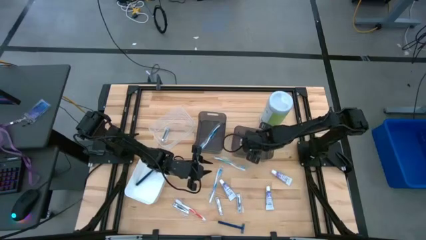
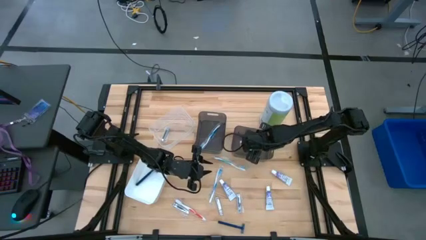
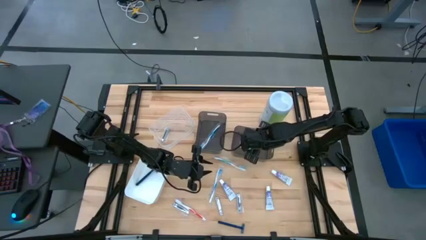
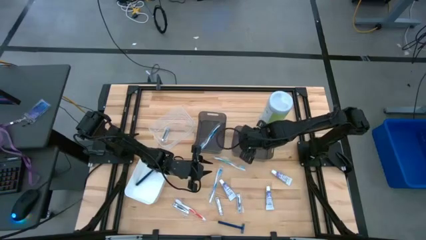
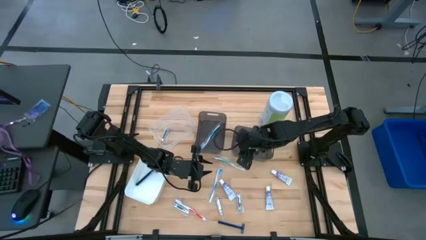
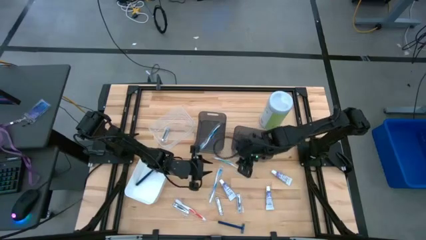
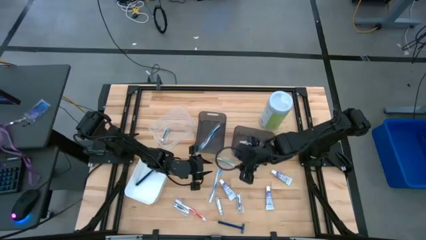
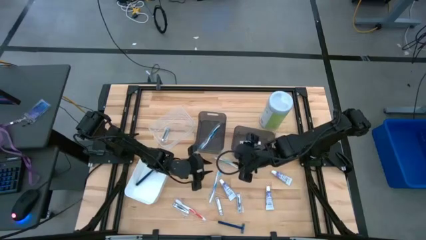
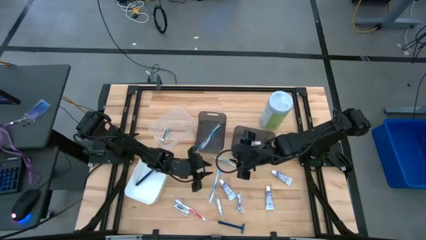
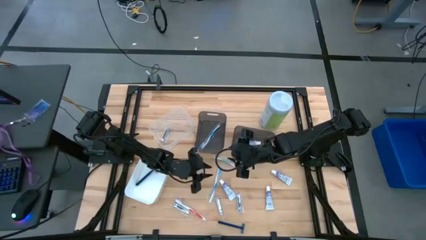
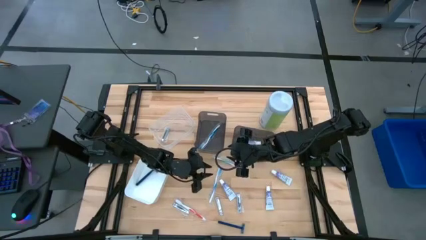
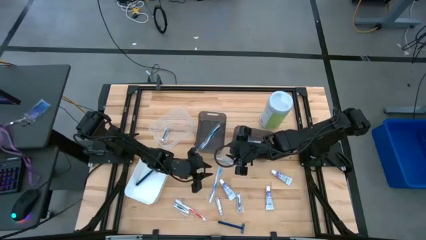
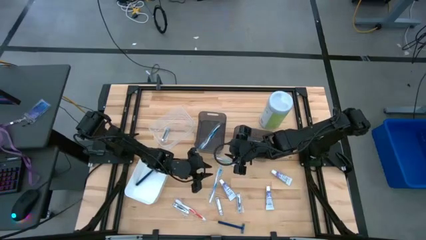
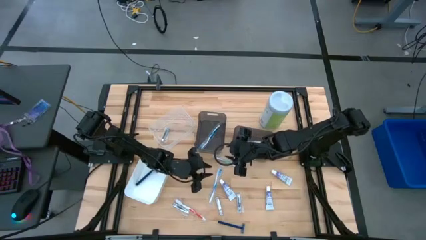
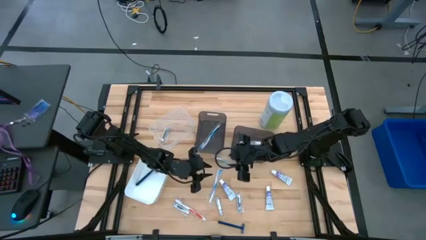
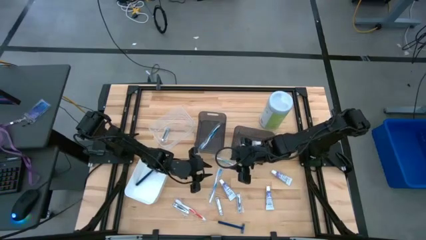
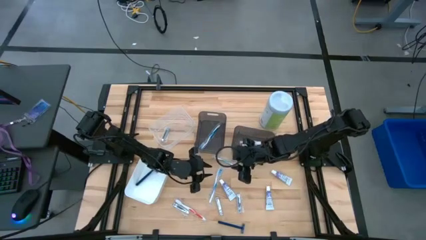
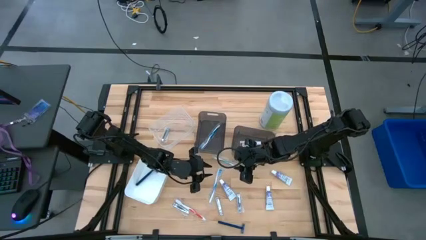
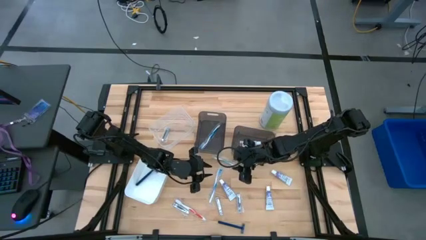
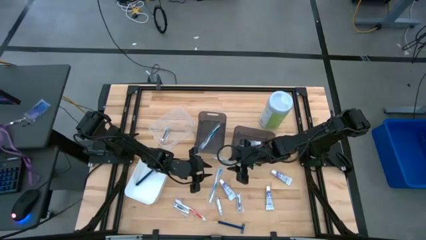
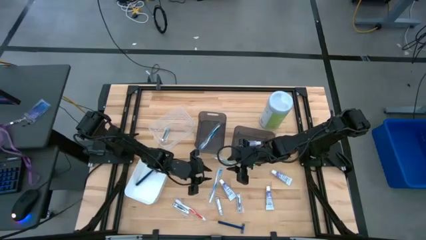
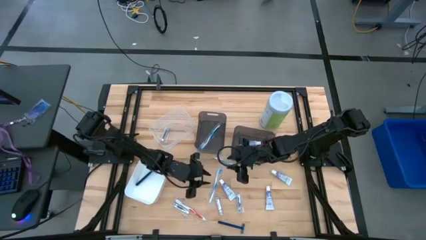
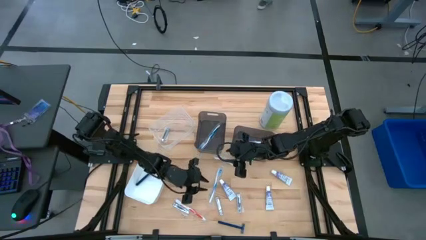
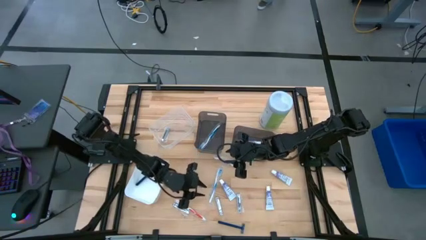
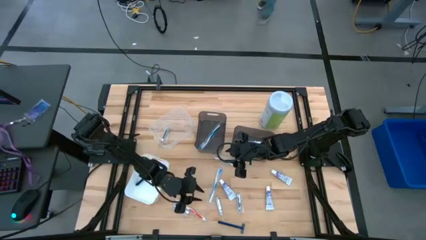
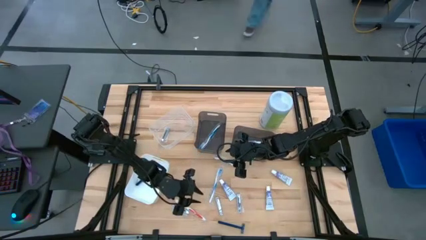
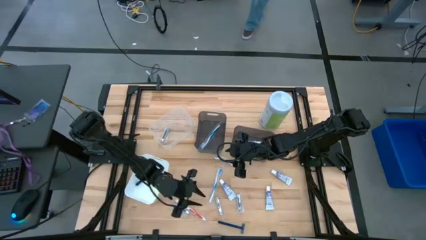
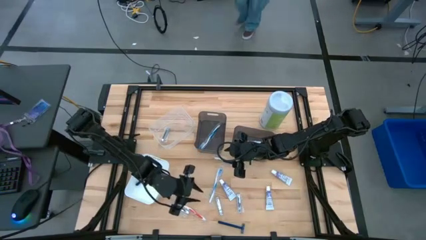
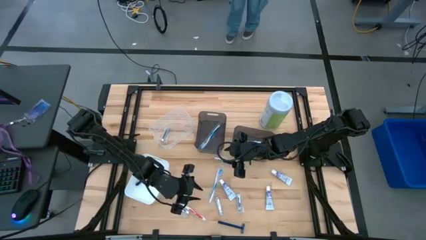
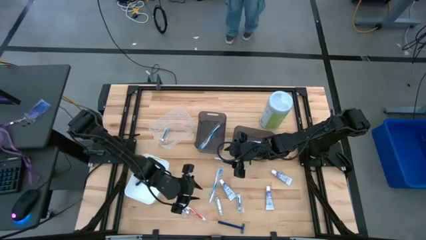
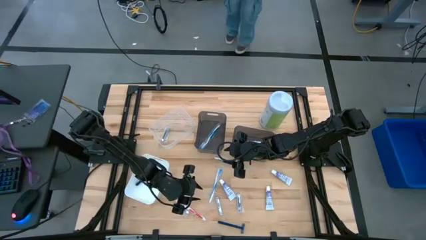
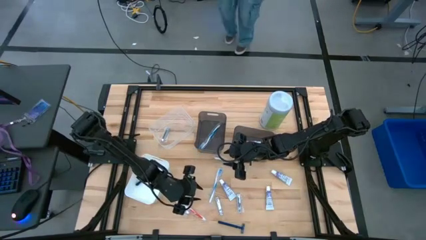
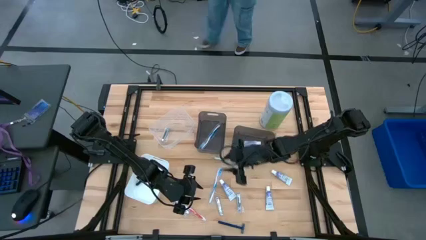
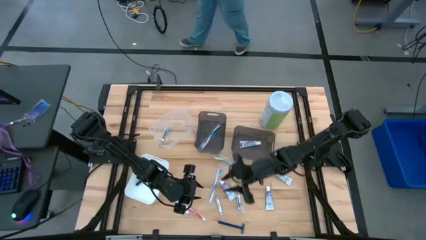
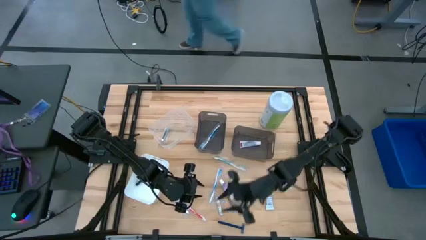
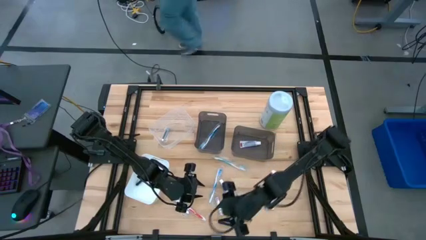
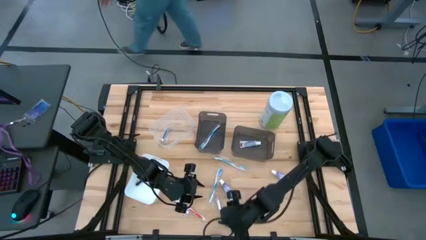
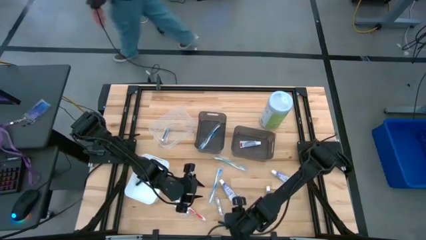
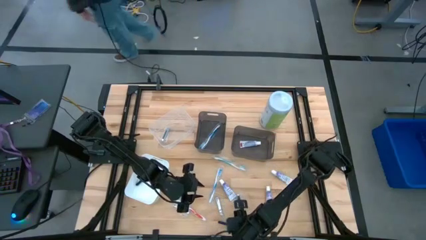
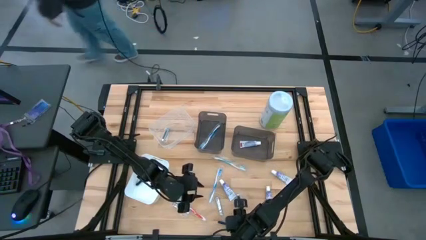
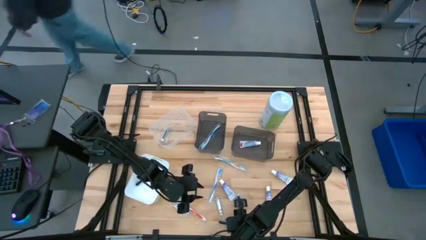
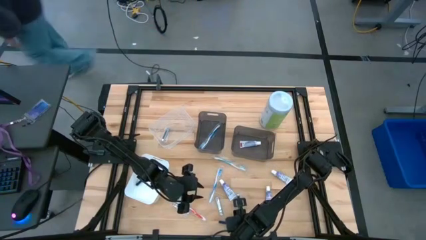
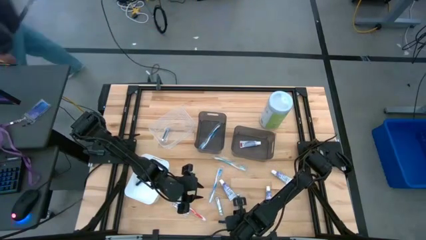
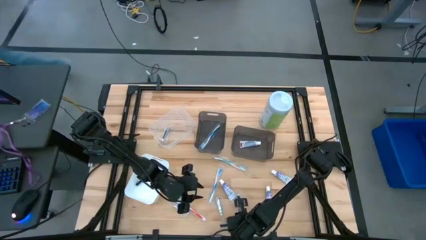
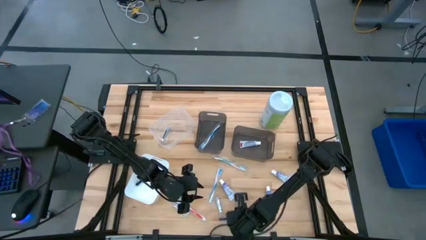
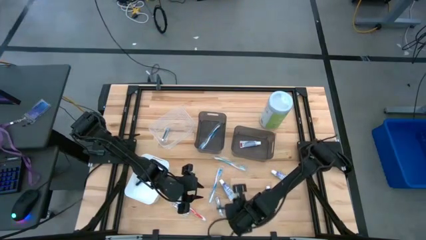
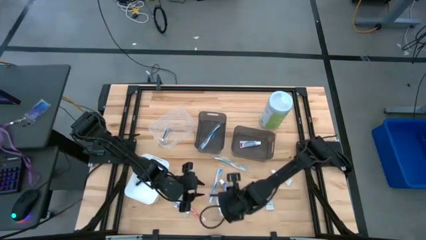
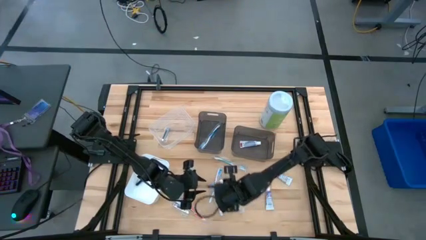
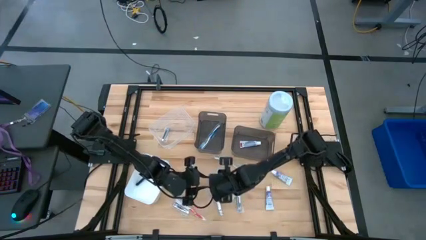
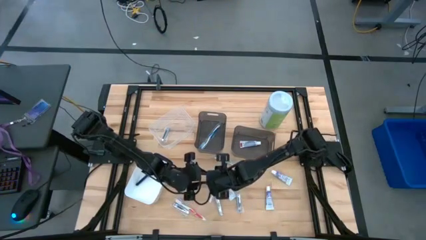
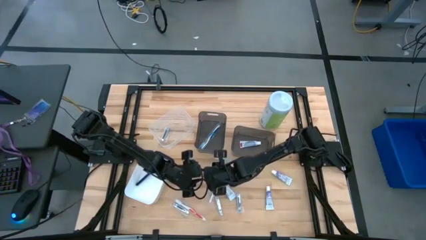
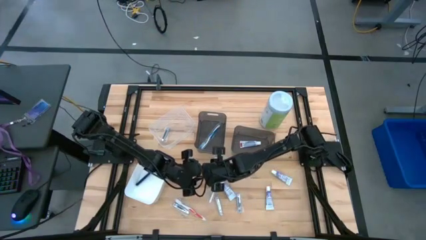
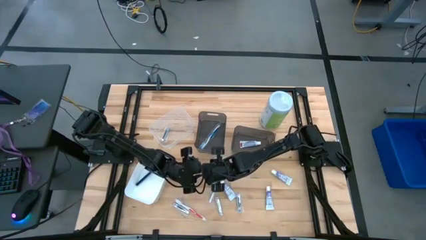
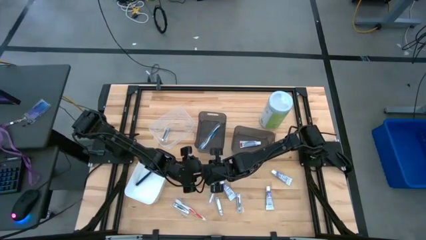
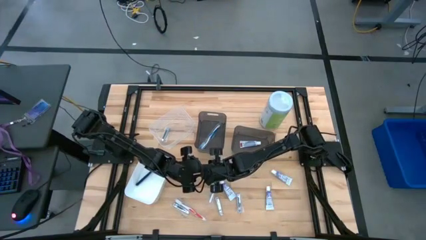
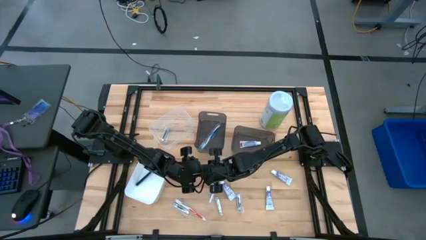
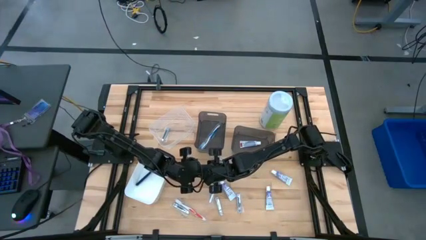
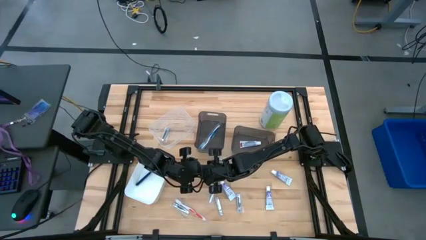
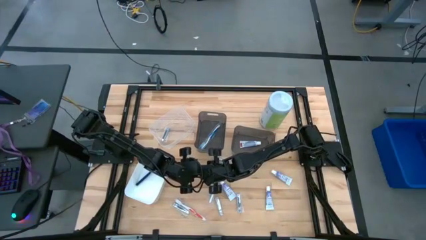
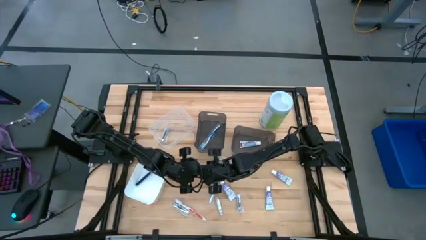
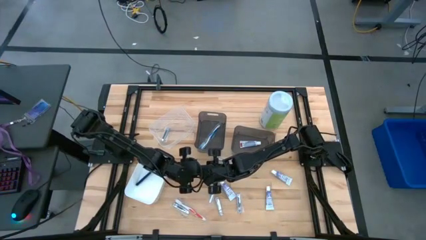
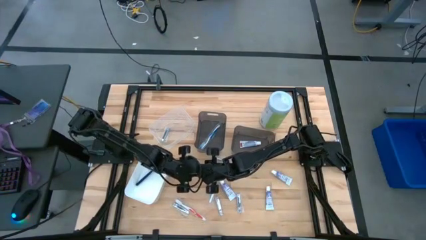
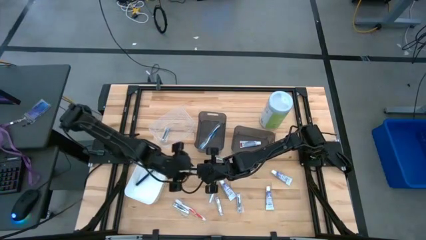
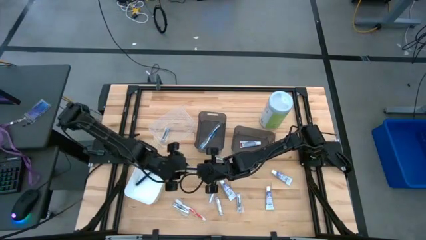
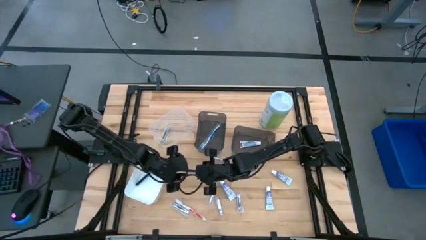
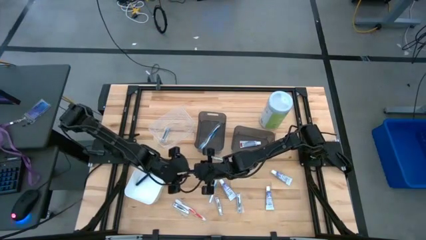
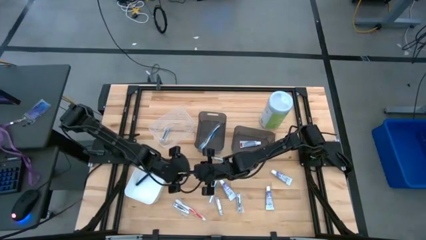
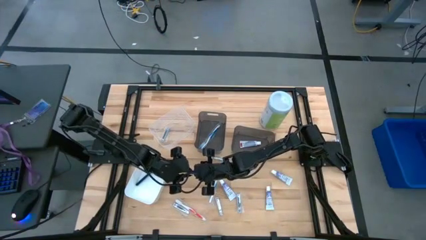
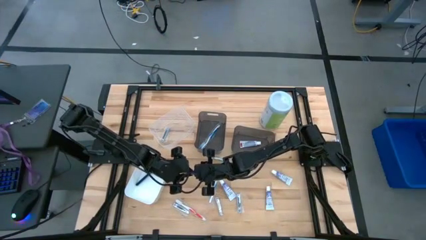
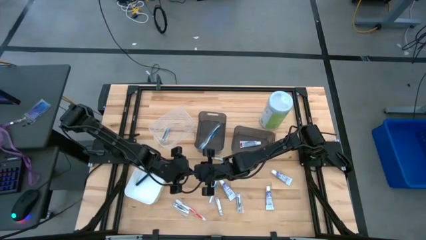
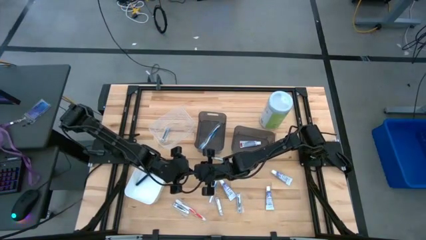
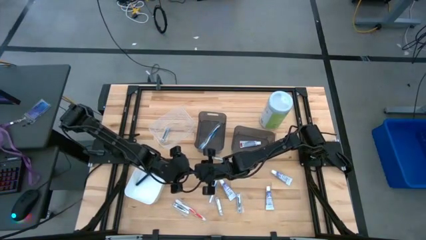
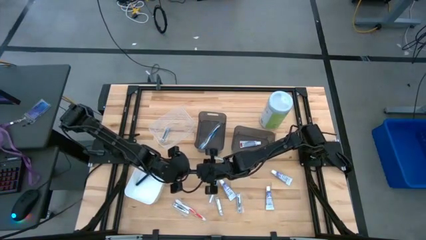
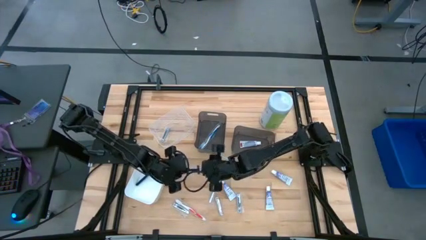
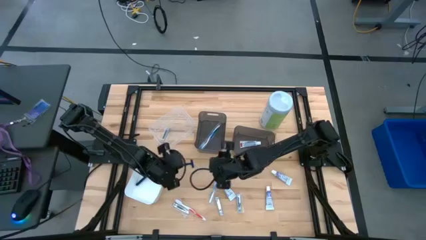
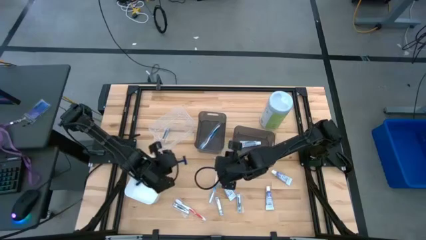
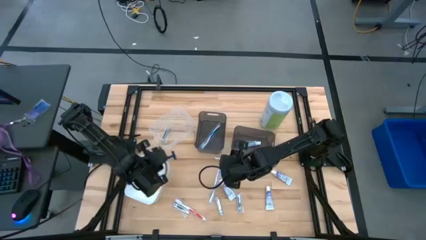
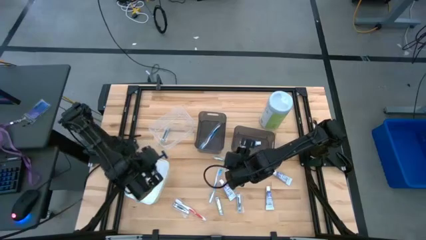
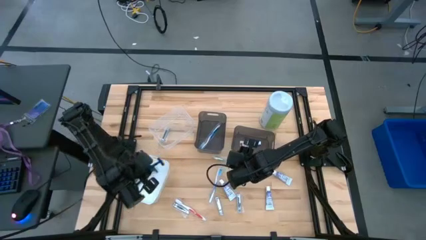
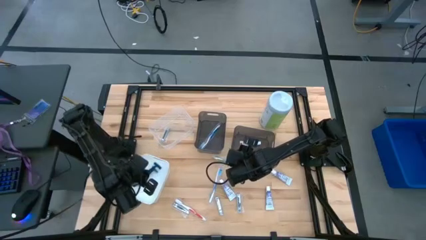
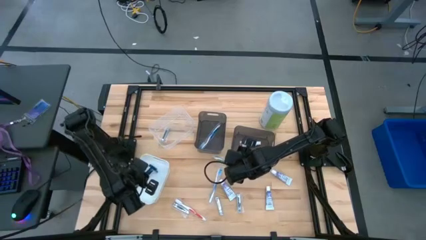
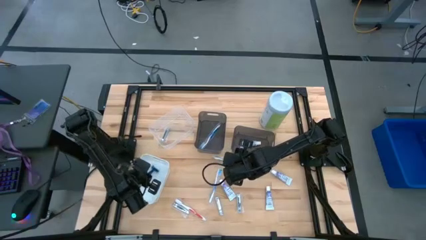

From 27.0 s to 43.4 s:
Task: Pick & Place Travel size toiletries
Put the blue razor into the white bin
